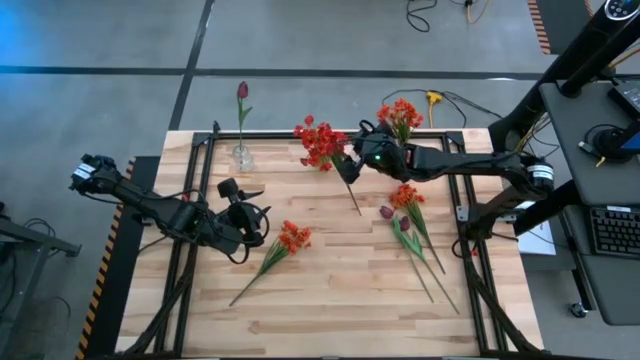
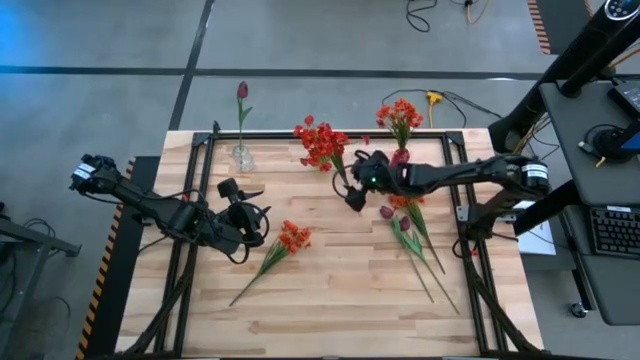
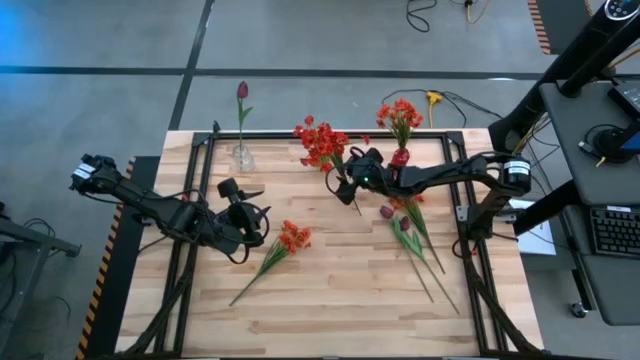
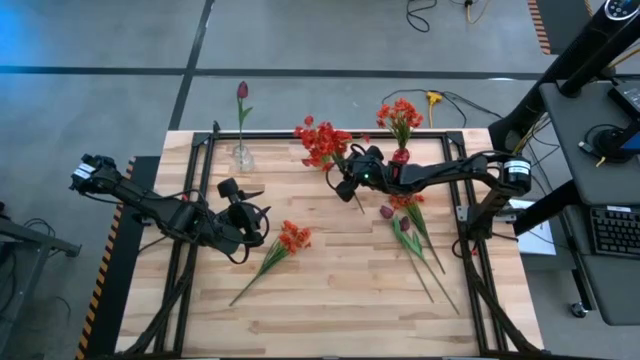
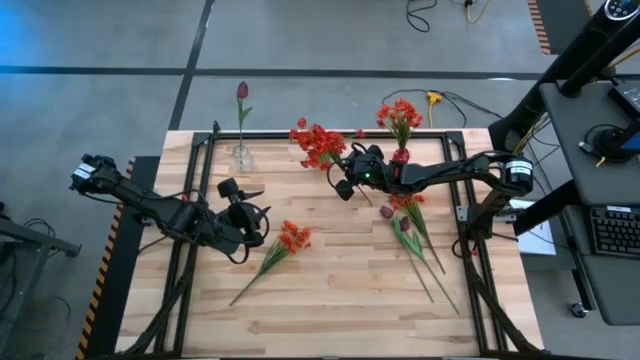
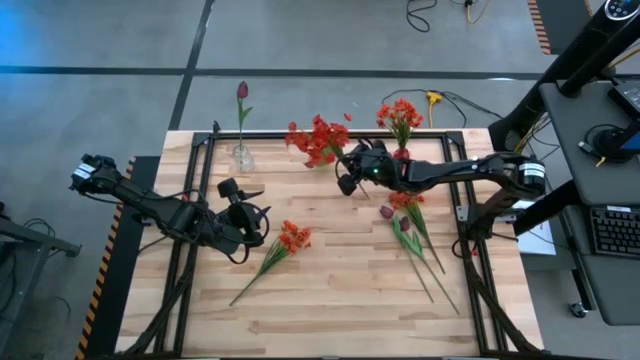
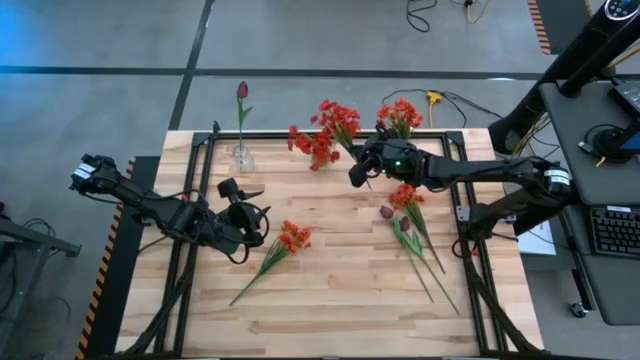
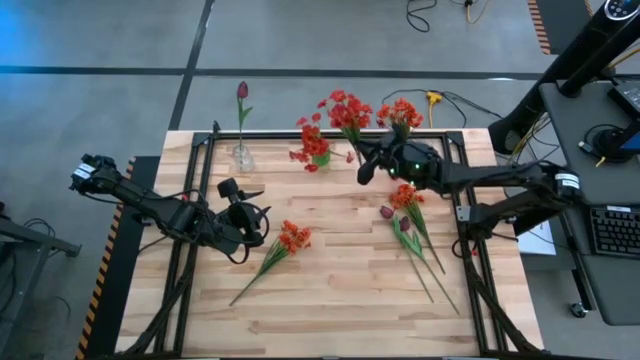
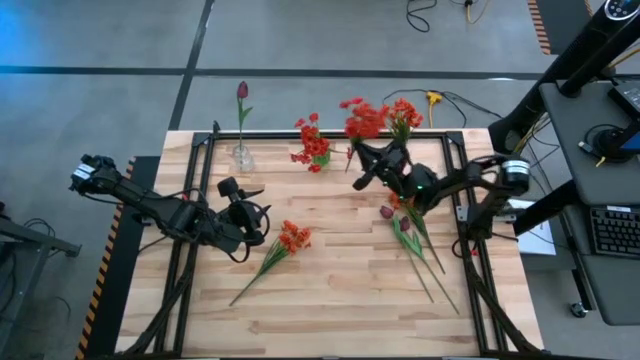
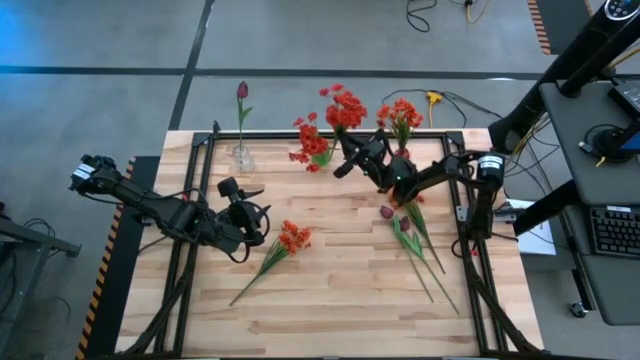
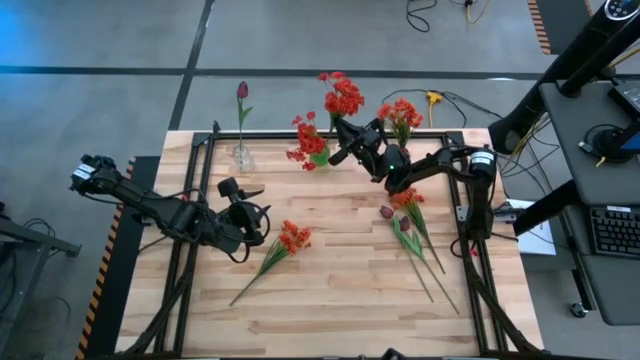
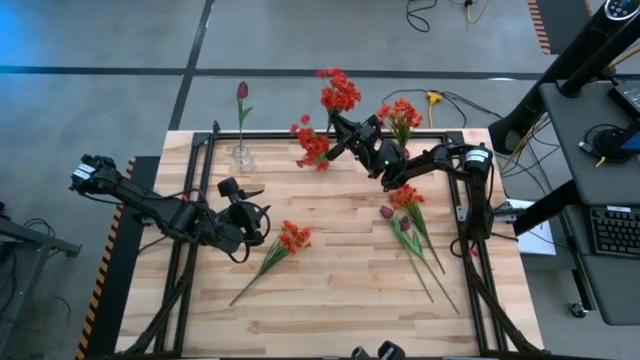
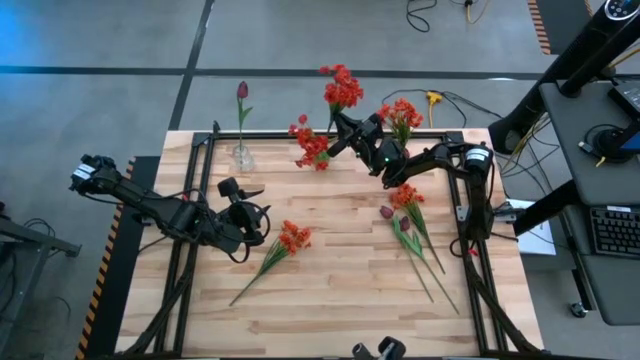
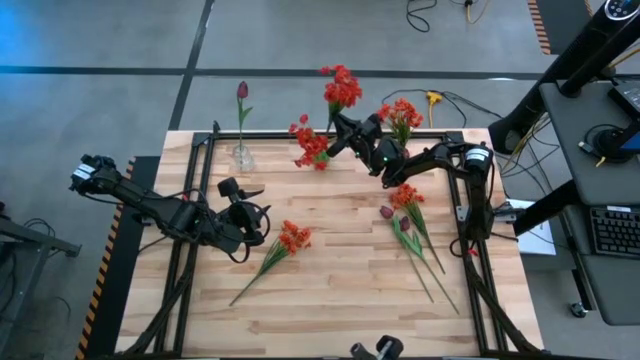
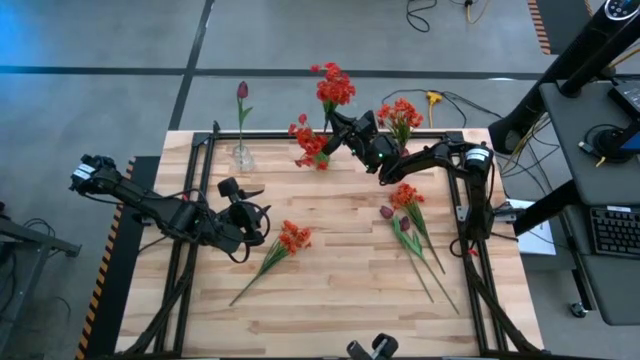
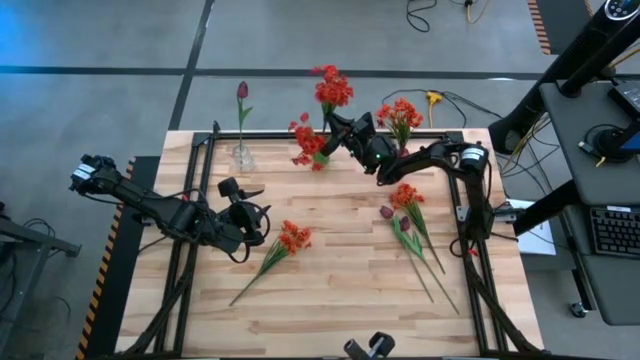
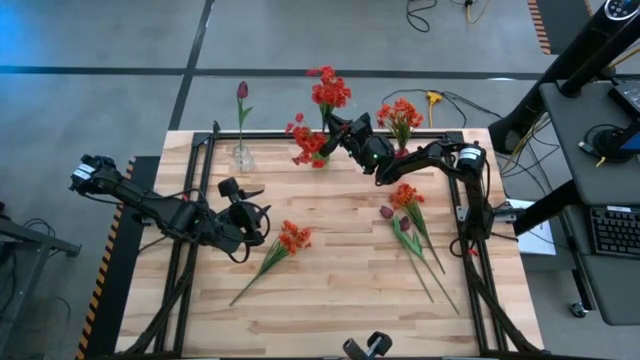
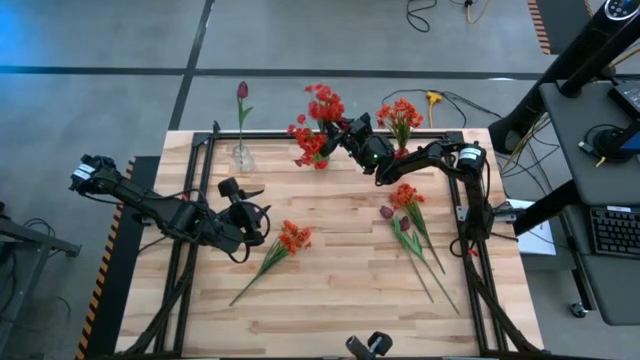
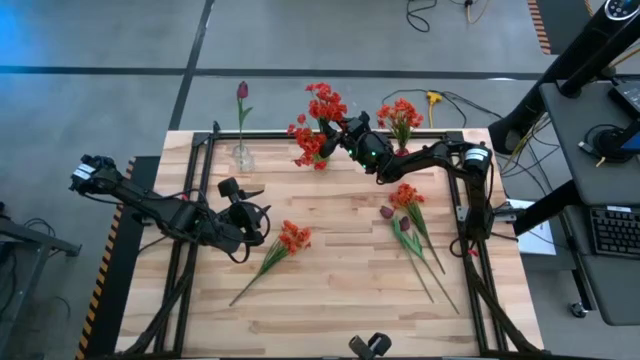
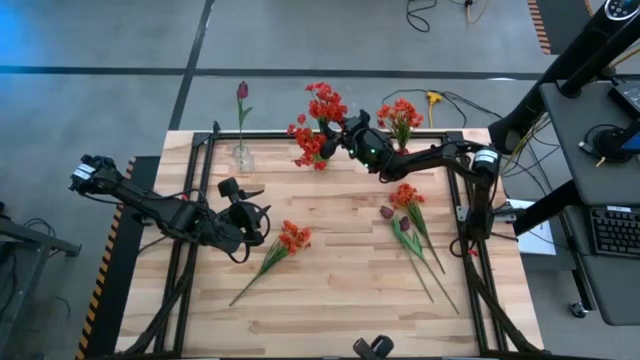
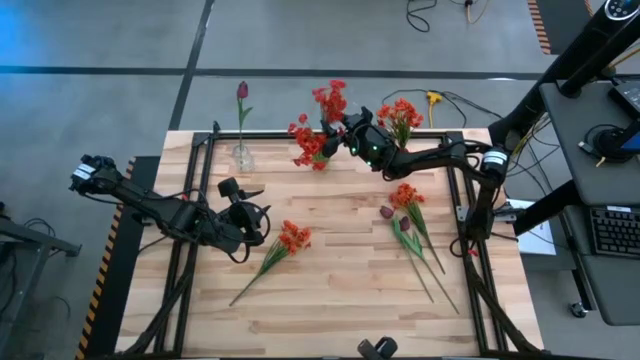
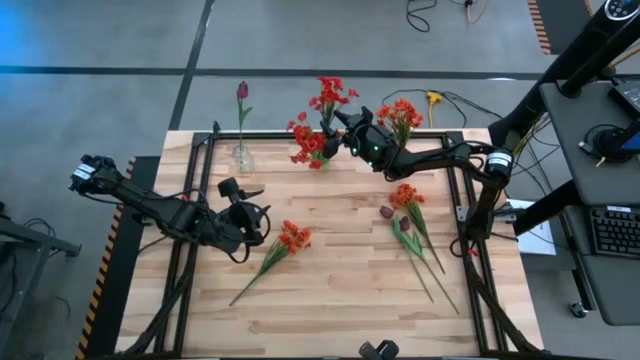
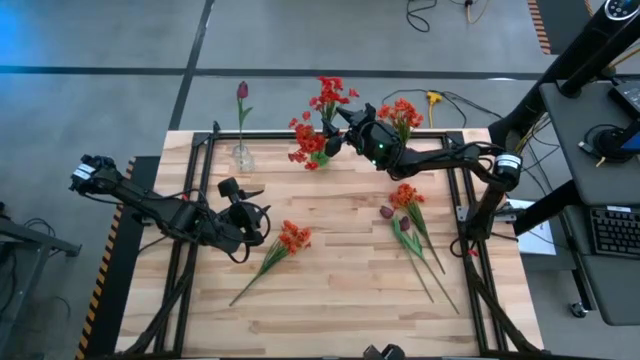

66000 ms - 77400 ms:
Task: Sort flowers into vase by color
Put the red flower into the green vase
